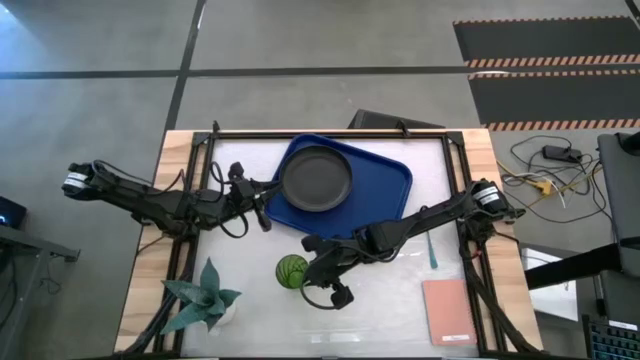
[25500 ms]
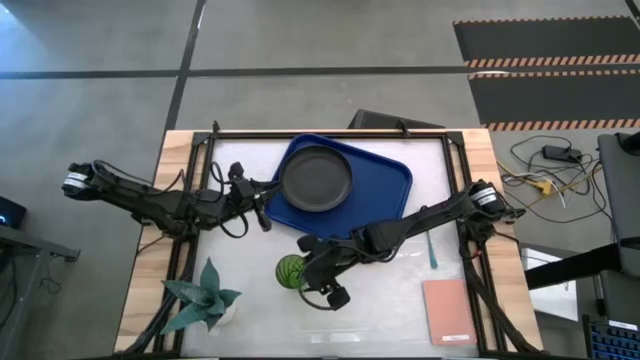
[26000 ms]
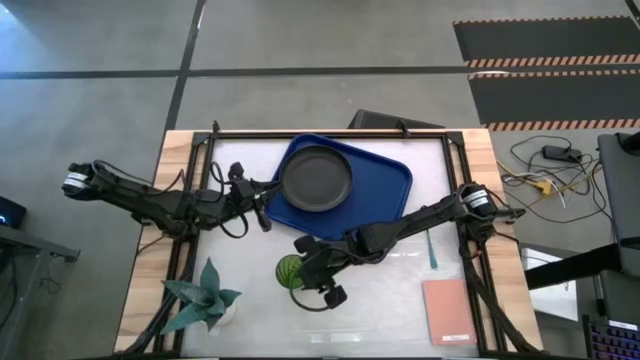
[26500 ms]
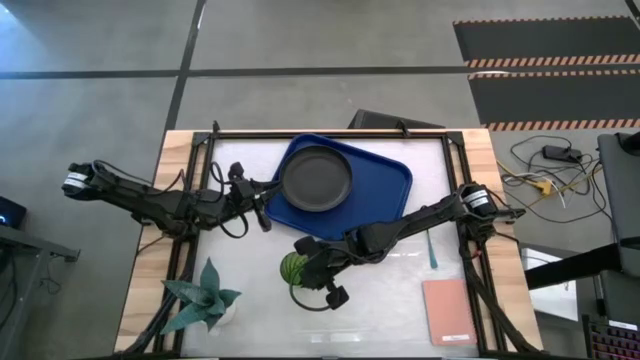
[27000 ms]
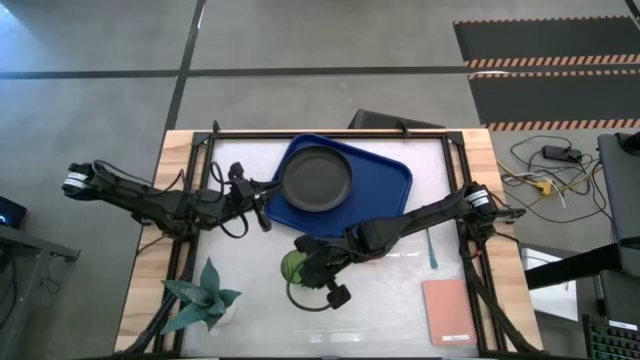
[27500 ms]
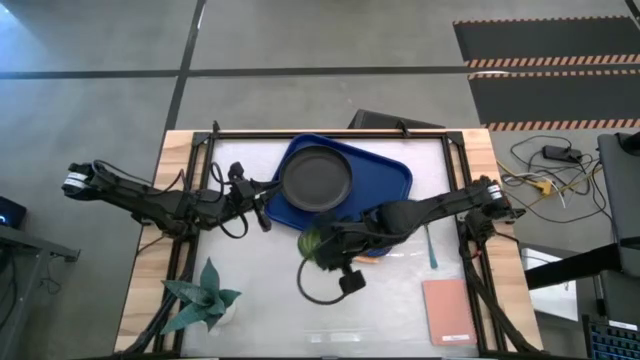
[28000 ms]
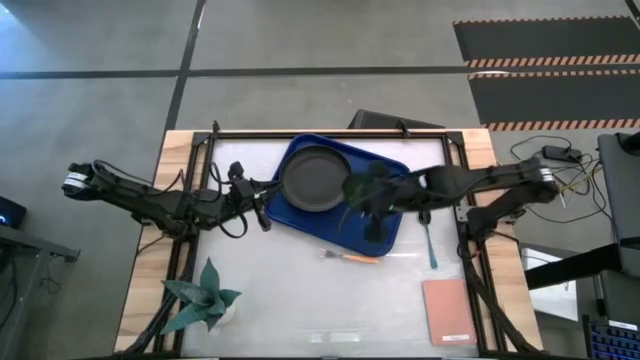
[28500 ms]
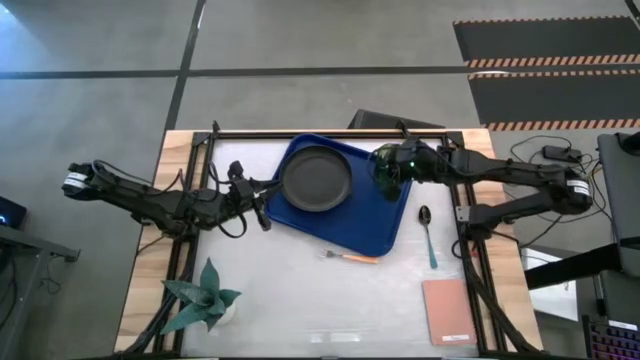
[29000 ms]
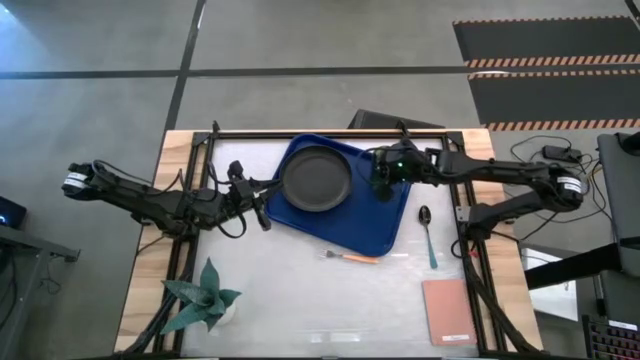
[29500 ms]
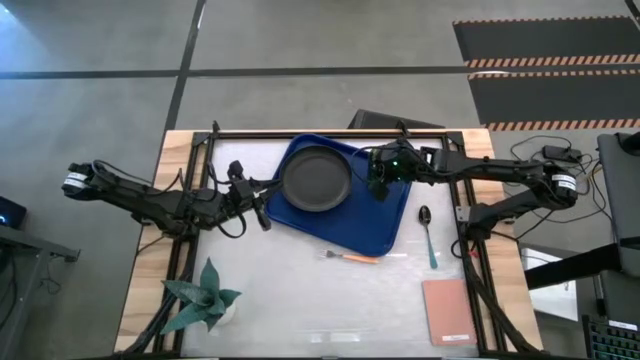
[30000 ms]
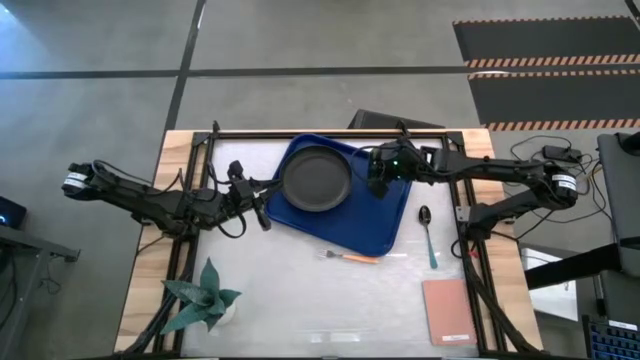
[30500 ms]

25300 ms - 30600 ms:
Task: Pick and place plate/cup/fork/spoon on tray
Put the green cup on the blue tray to the top right of the black plate

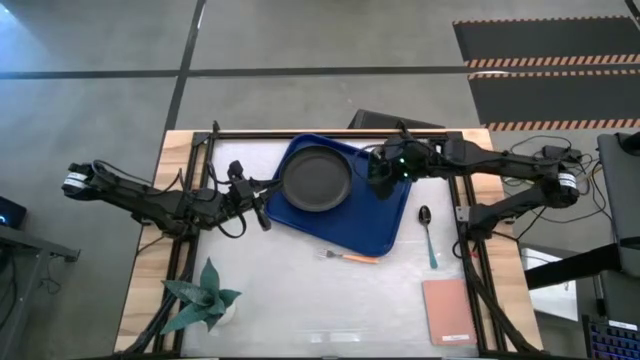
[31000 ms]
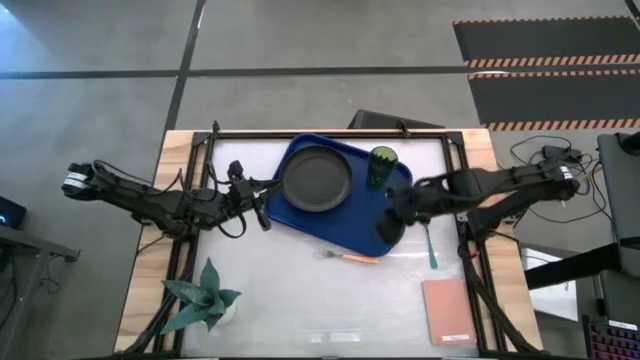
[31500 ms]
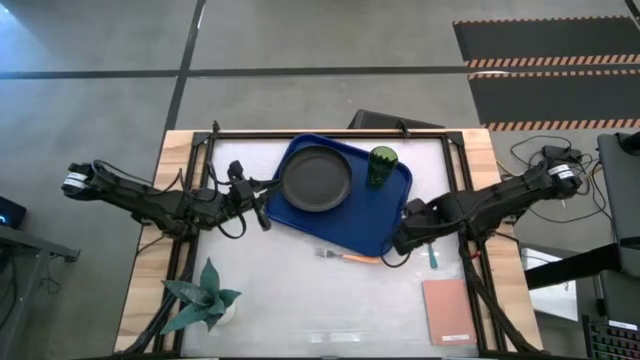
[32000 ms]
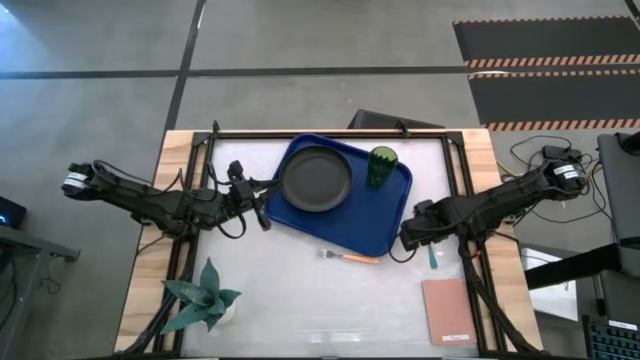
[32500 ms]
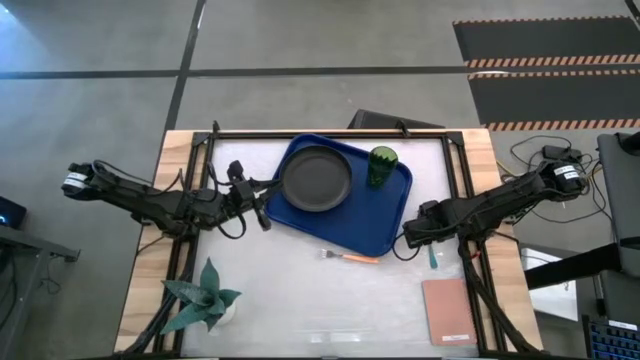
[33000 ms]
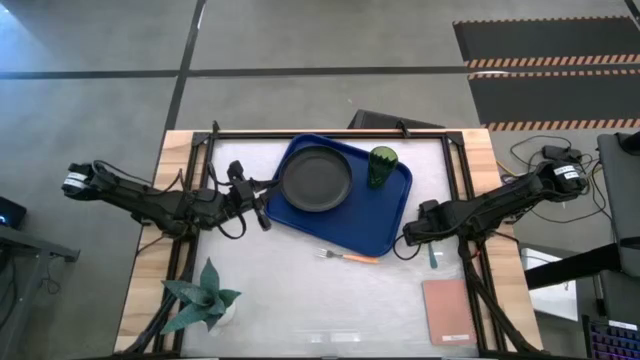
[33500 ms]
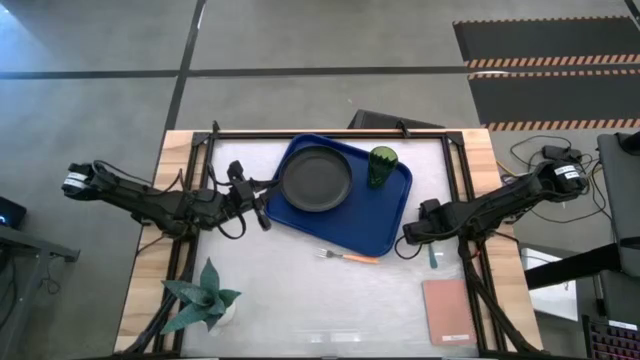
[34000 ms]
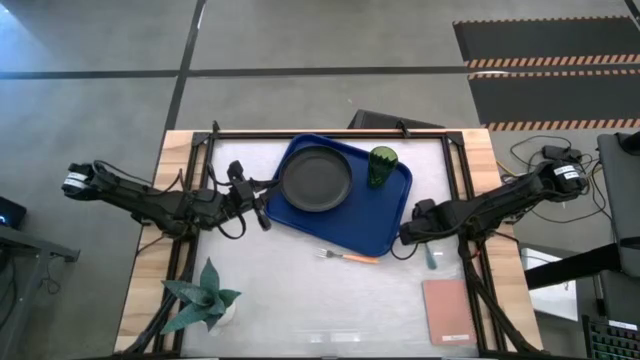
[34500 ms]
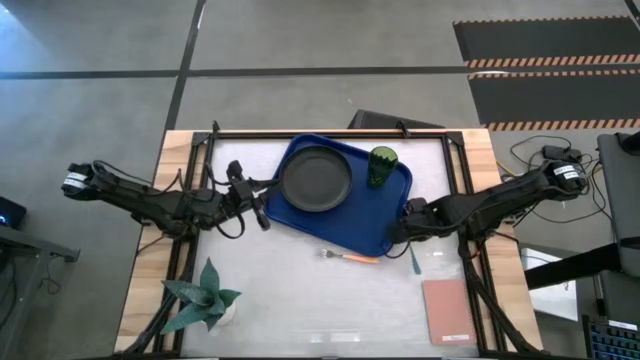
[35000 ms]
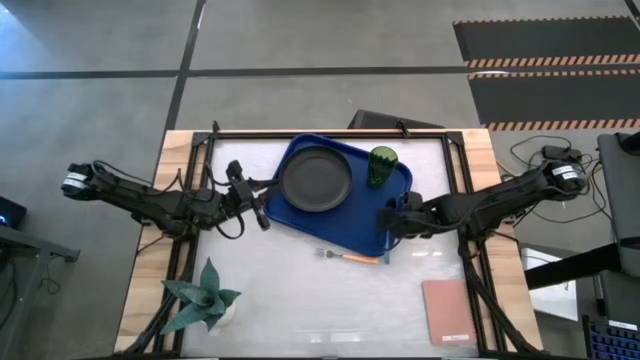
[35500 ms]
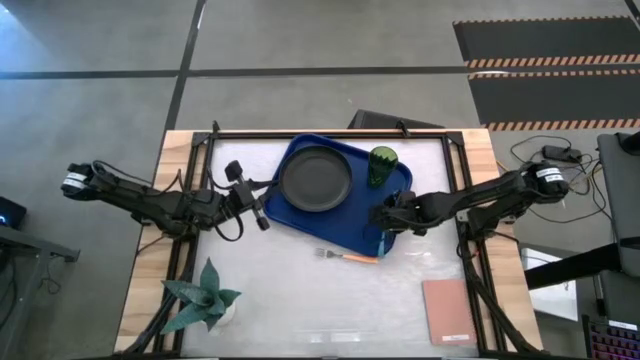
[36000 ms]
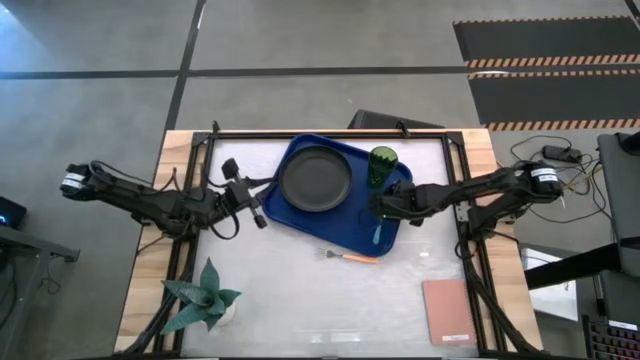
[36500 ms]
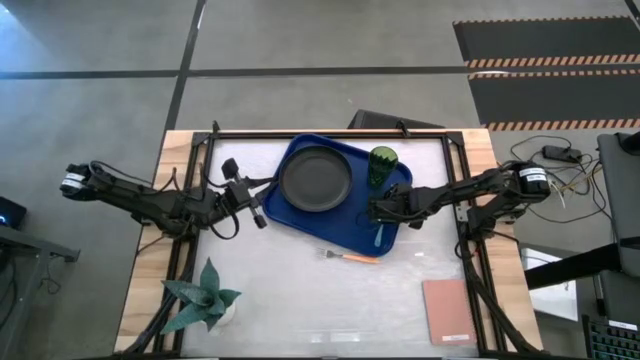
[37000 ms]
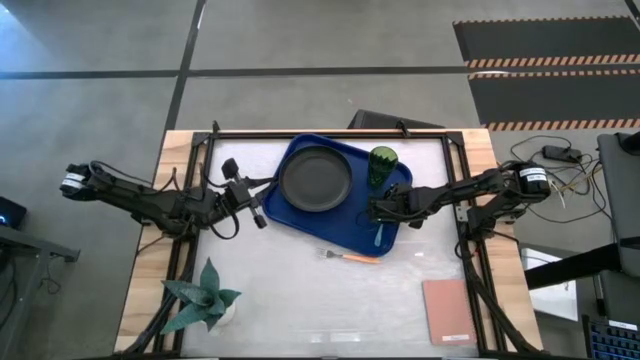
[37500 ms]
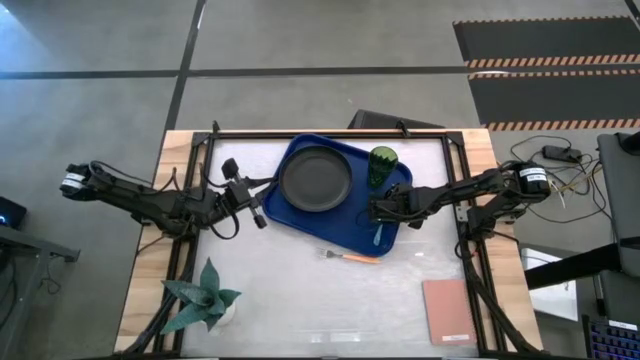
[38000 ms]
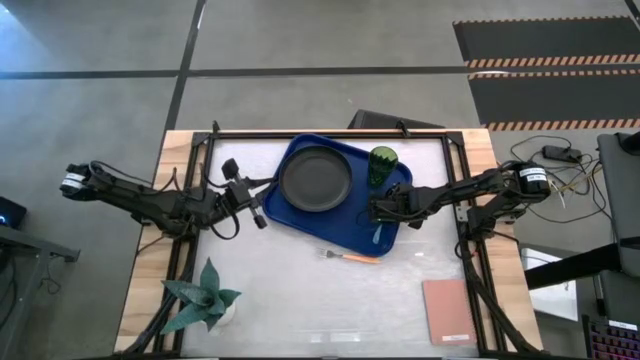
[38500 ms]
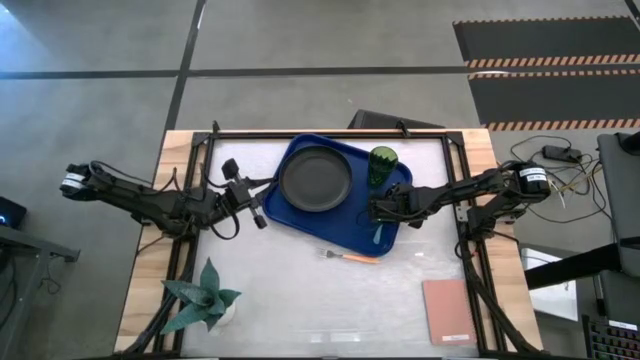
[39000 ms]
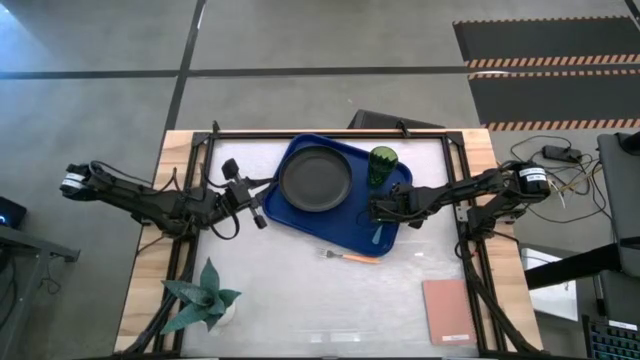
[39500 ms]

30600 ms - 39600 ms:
Put the blue spoon on the blue tray to the right of the black plate
